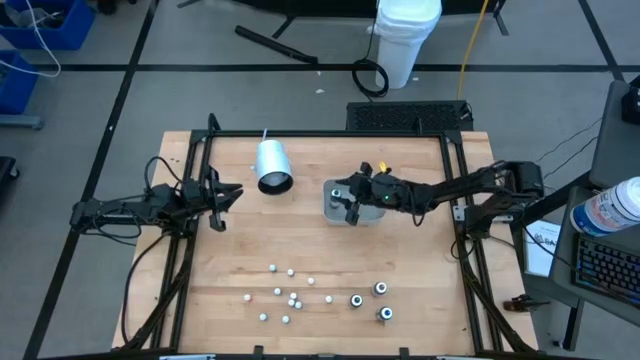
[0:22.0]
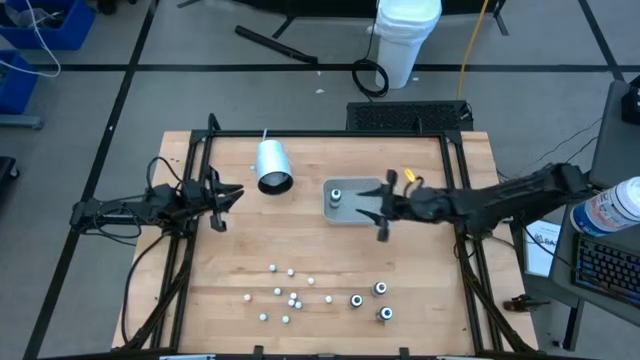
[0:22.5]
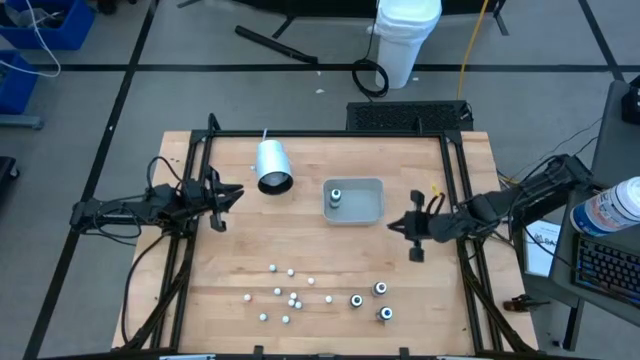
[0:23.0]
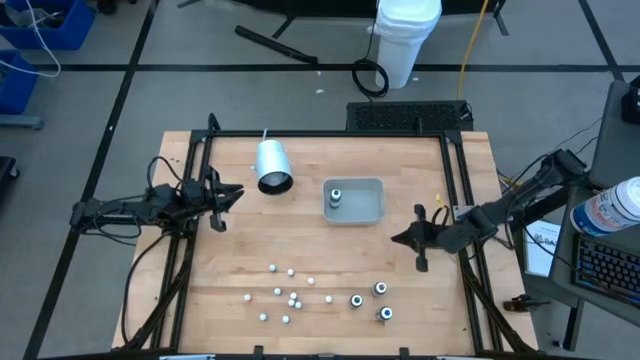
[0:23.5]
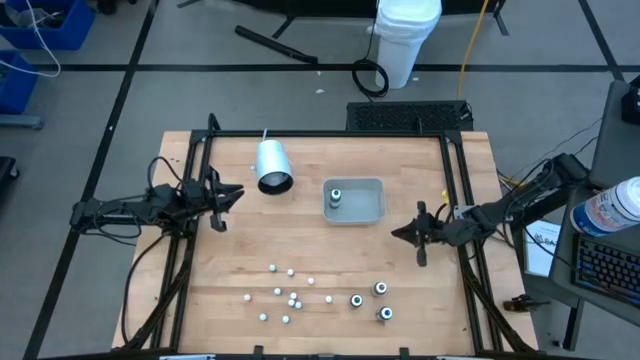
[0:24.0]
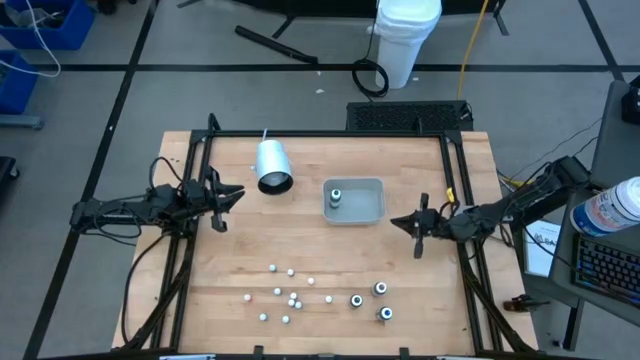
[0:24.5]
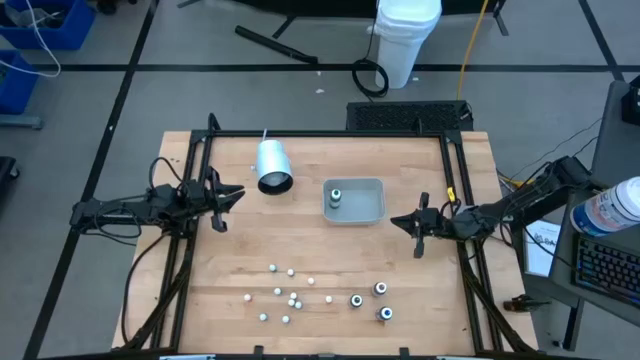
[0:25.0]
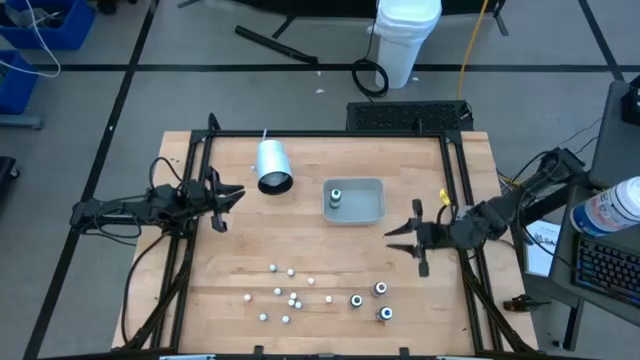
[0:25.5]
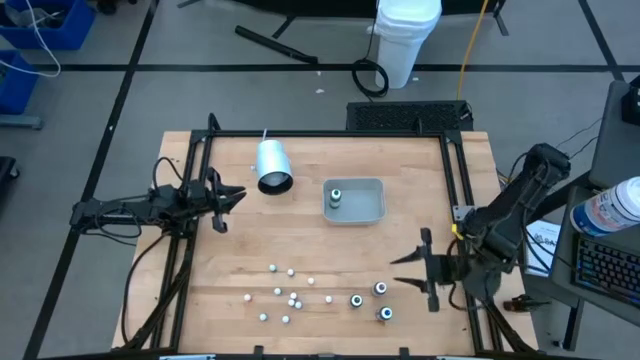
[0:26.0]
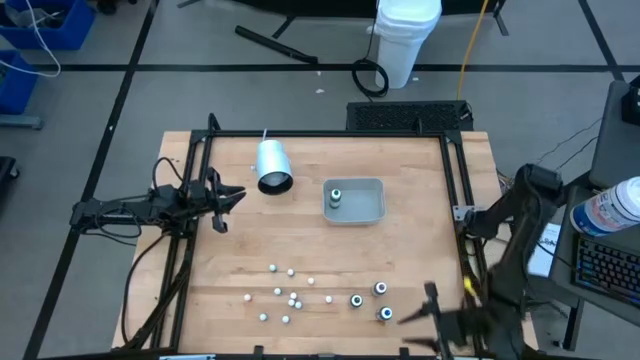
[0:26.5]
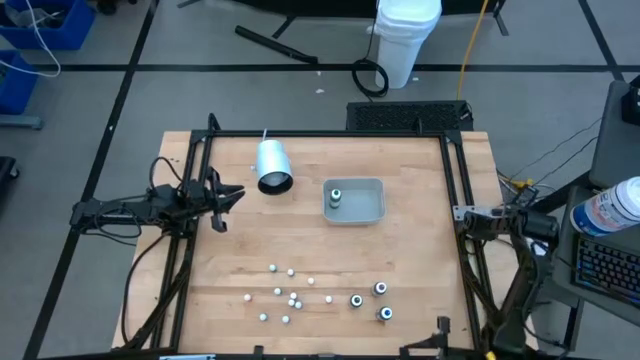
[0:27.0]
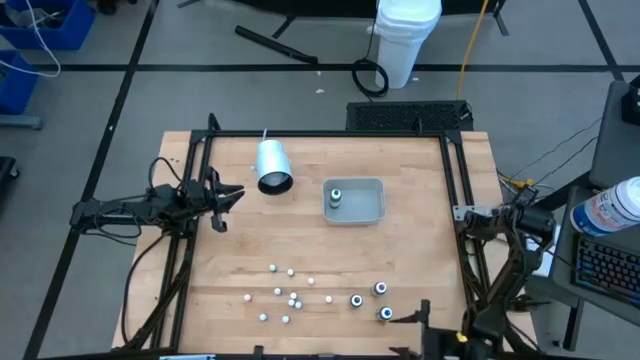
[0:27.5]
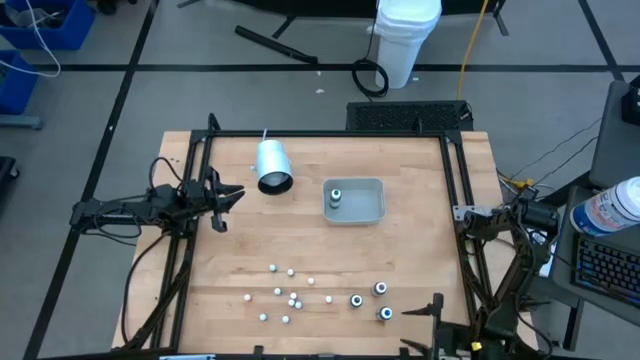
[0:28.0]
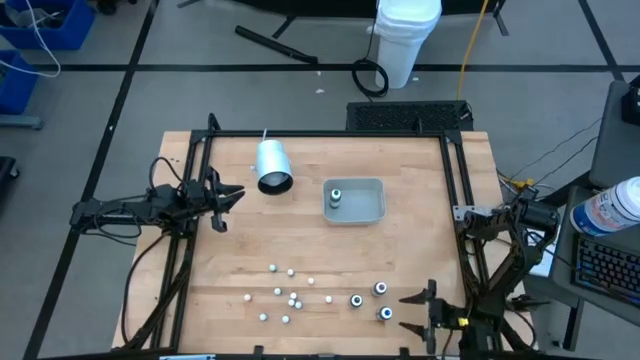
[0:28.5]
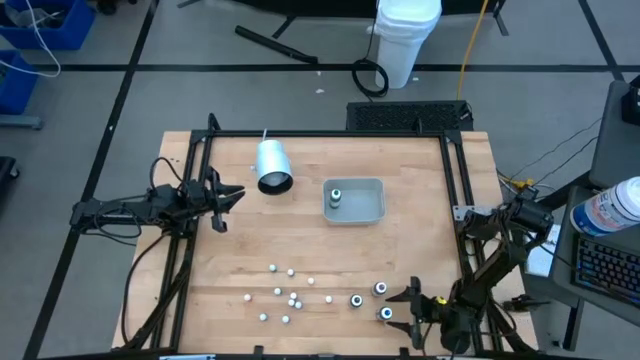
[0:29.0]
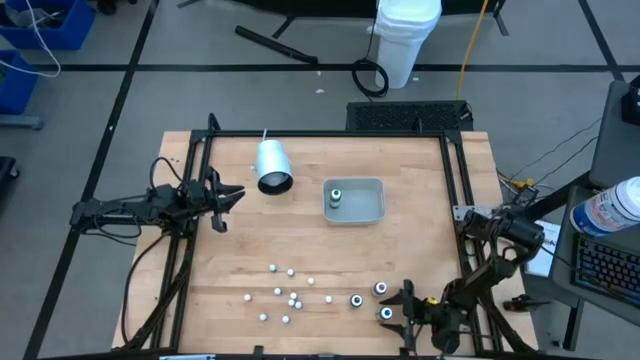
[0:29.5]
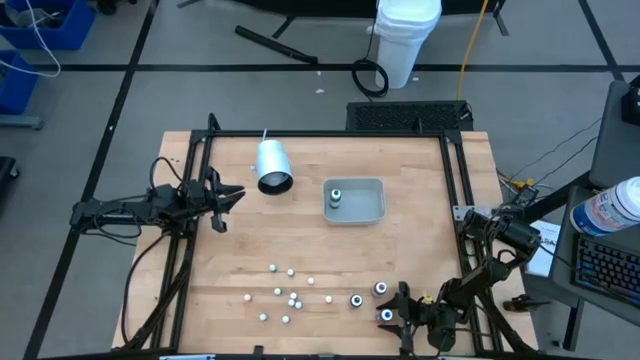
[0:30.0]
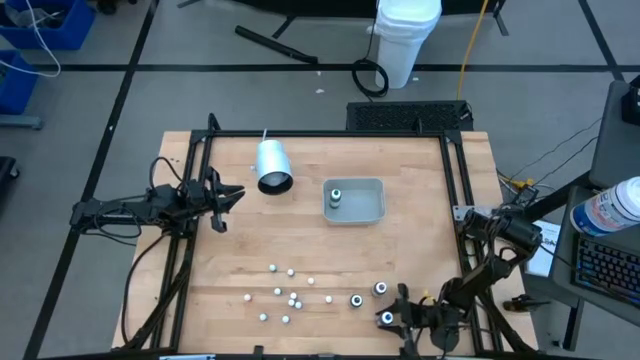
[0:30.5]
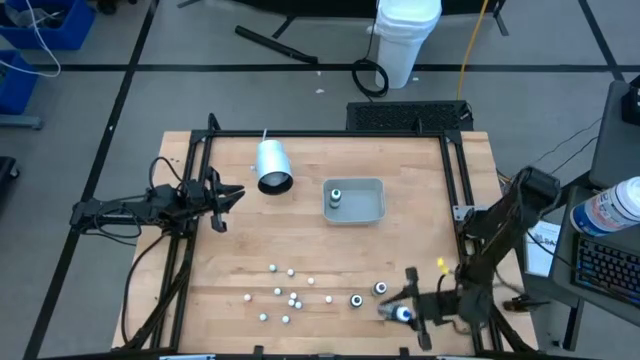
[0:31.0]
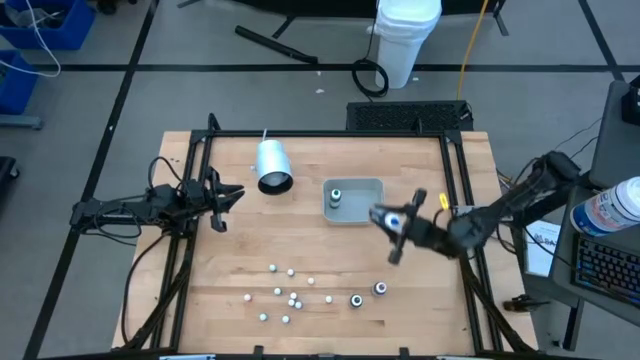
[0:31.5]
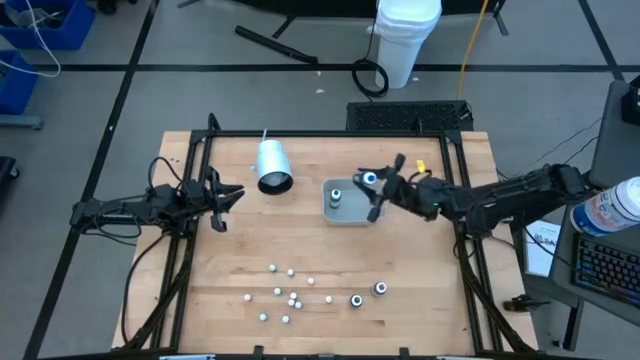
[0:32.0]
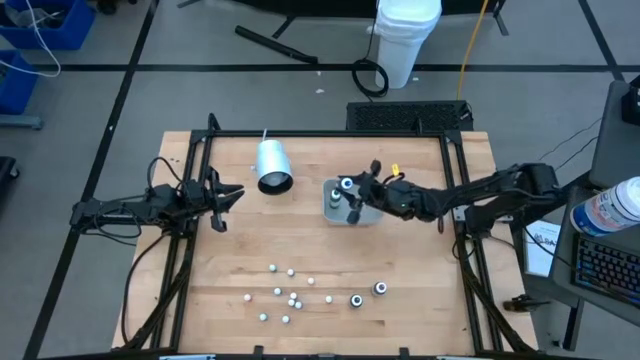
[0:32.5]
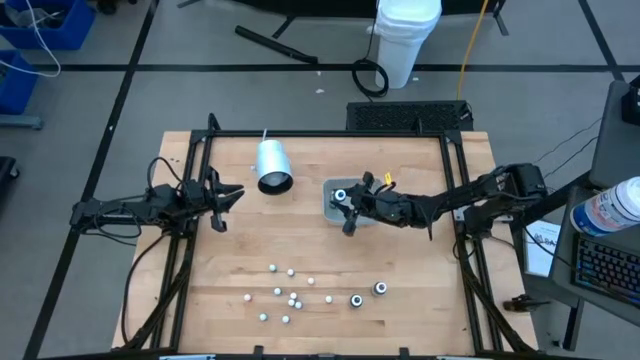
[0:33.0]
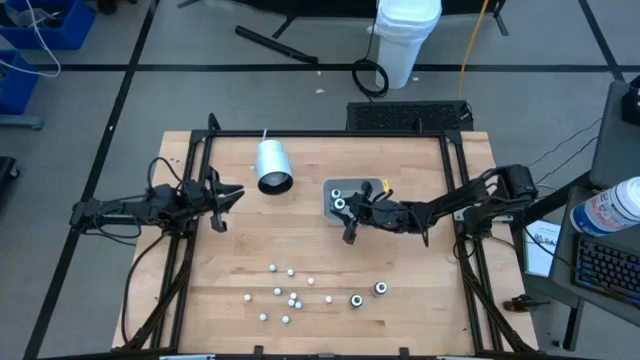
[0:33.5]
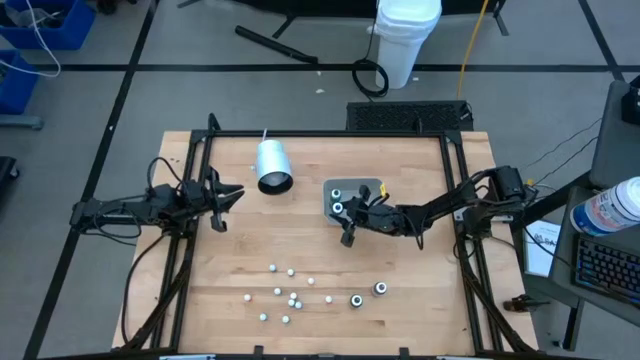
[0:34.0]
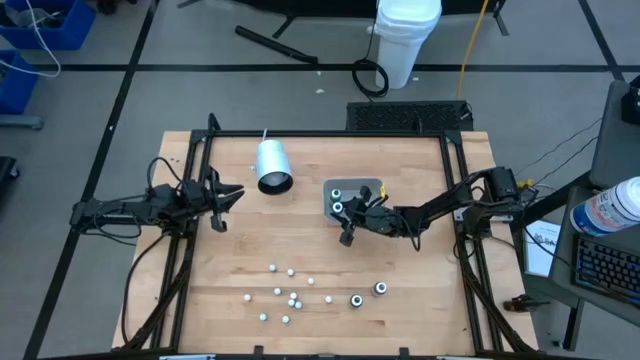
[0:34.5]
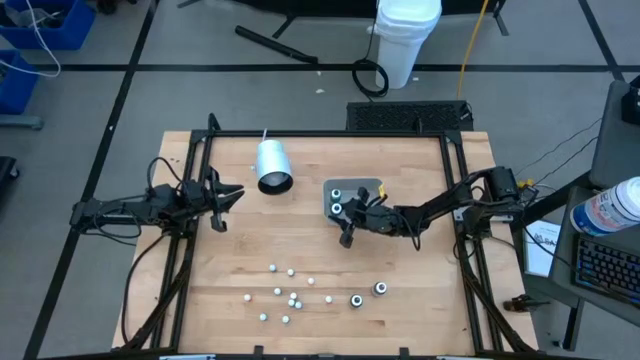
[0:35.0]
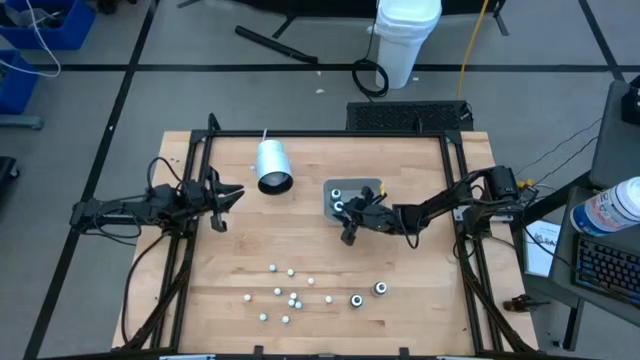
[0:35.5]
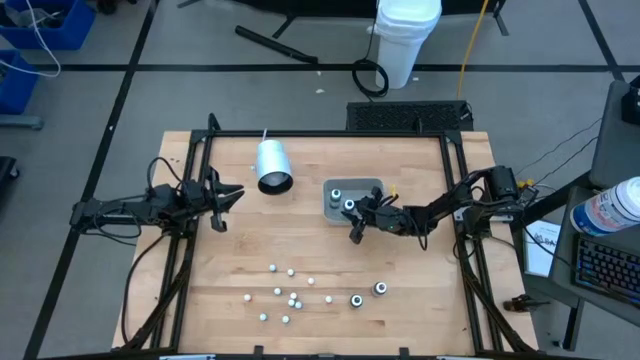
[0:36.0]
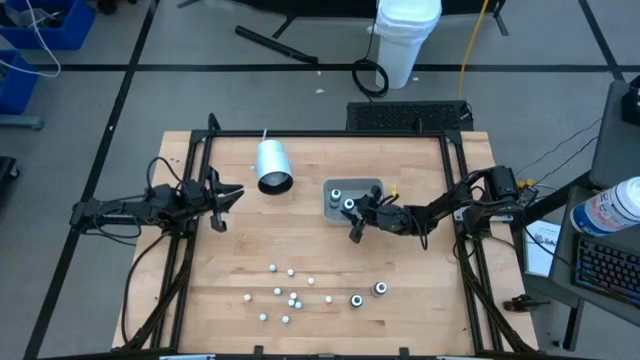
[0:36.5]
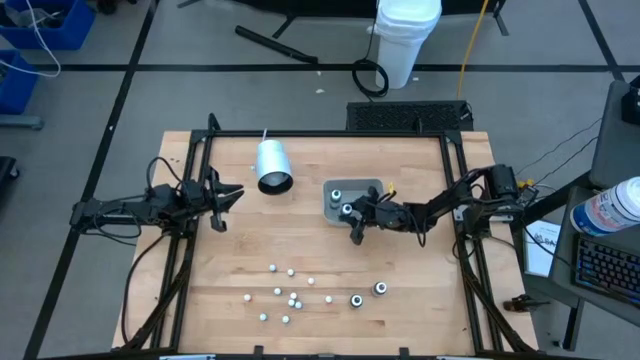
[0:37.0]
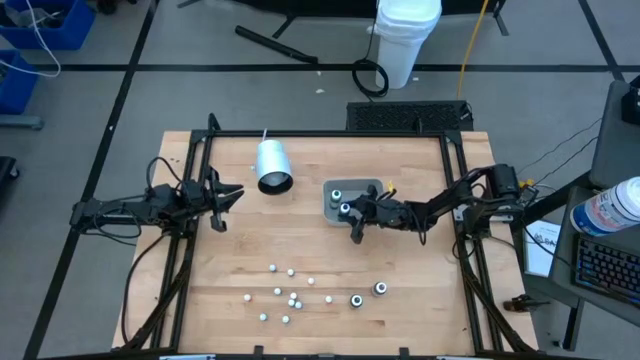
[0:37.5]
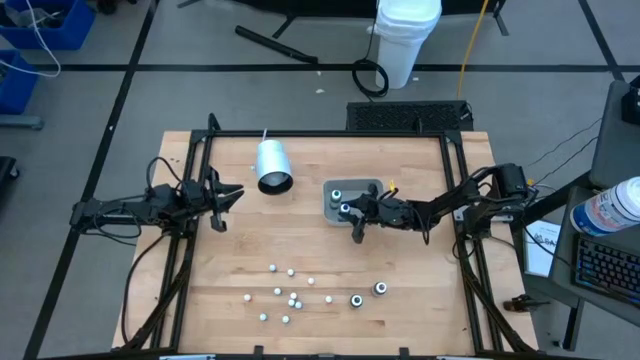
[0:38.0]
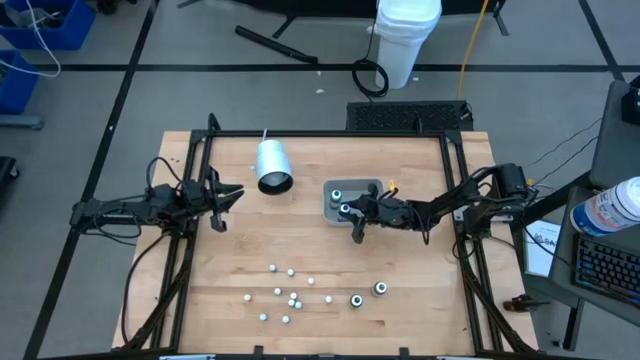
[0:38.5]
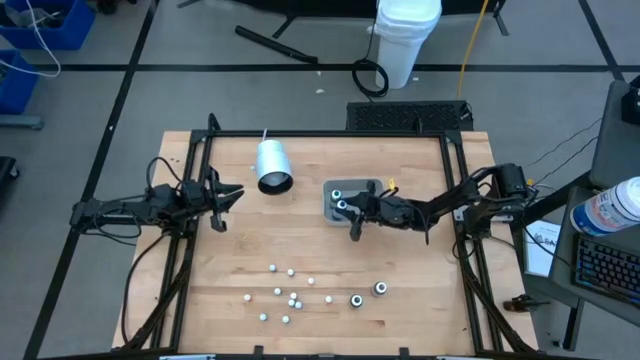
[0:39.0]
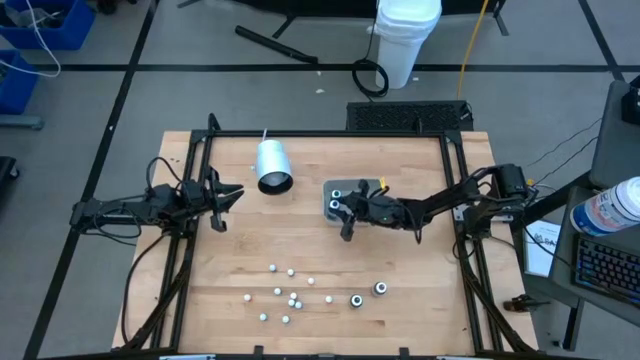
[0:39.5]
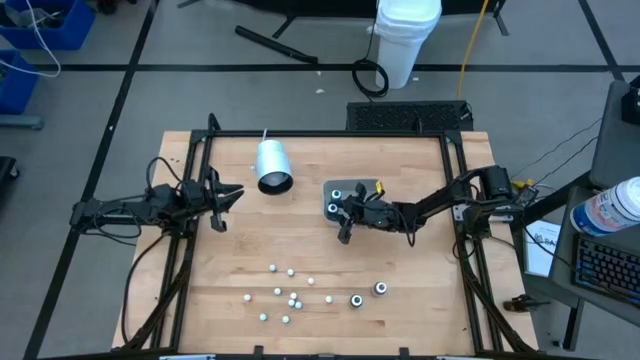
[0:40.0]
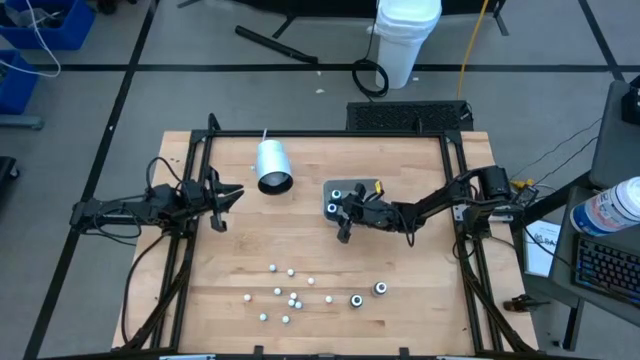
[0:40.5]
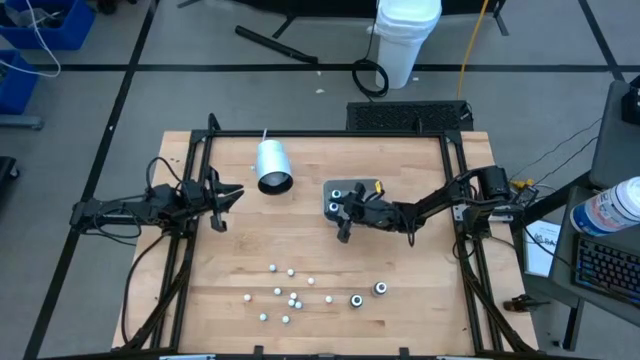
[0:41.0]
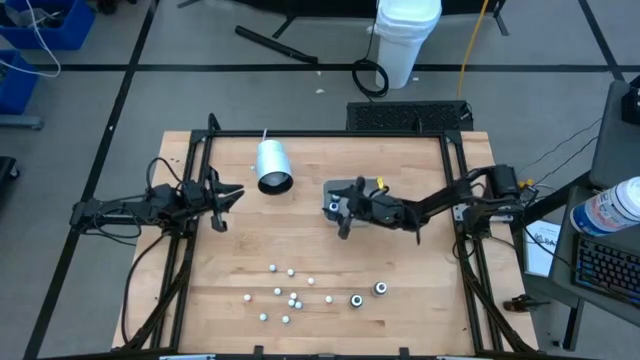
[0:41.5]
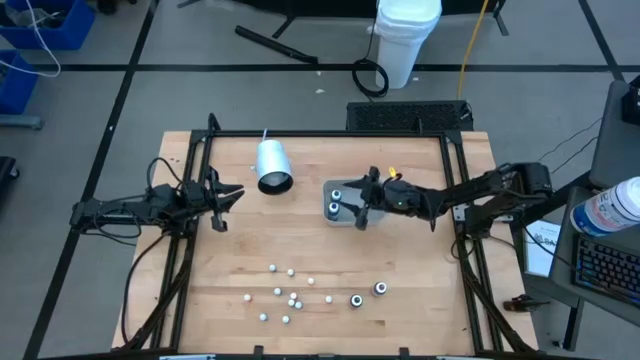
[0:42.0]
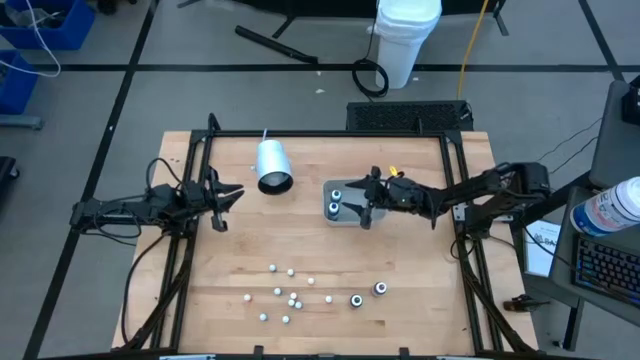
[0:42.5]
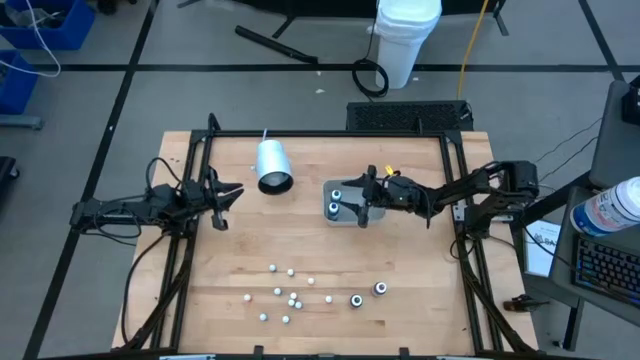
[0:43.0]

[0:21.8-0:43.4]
Task: Pick & Place food coloring
Put the blue food coloring bottle into the gray bin
